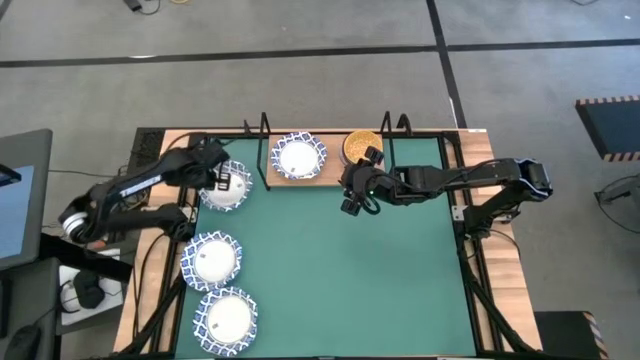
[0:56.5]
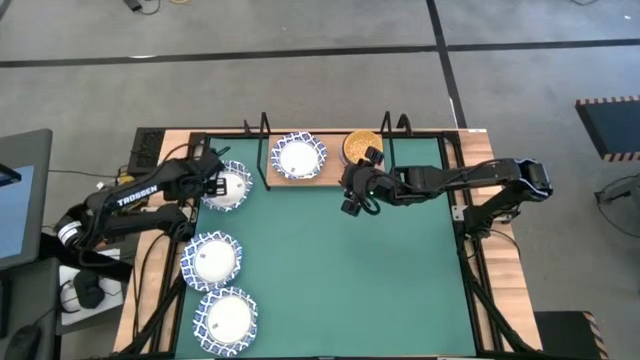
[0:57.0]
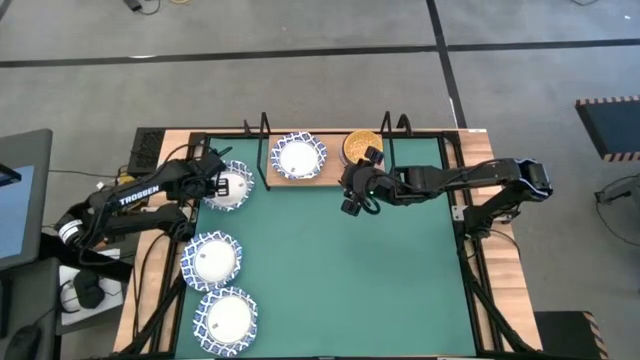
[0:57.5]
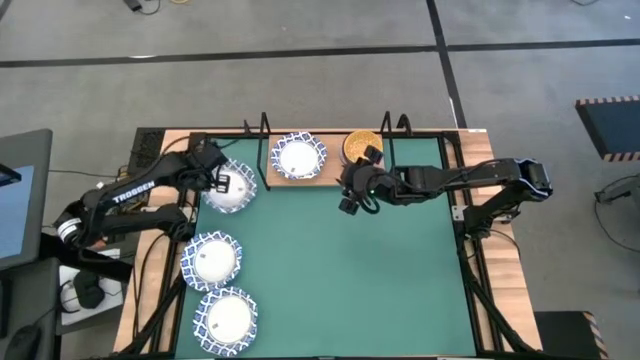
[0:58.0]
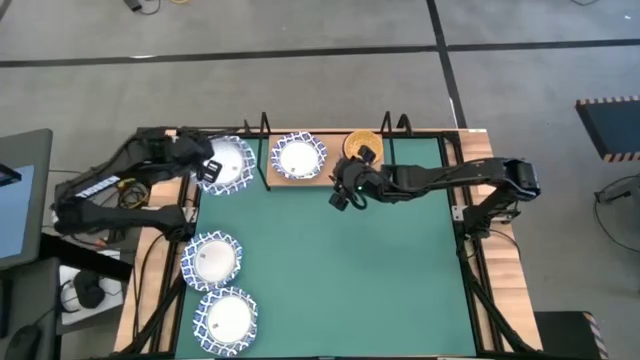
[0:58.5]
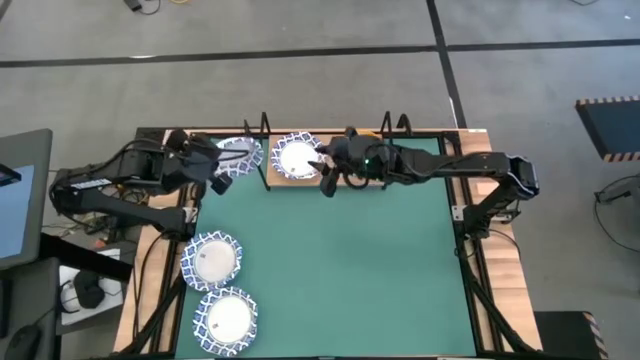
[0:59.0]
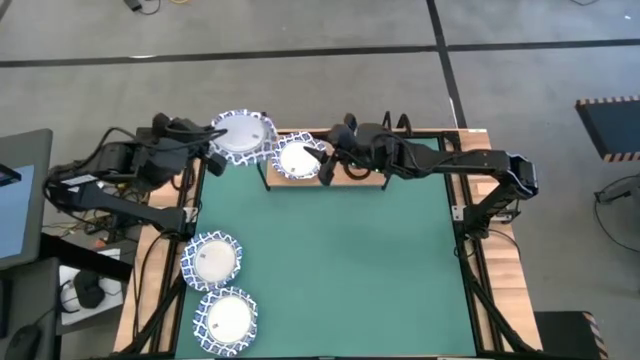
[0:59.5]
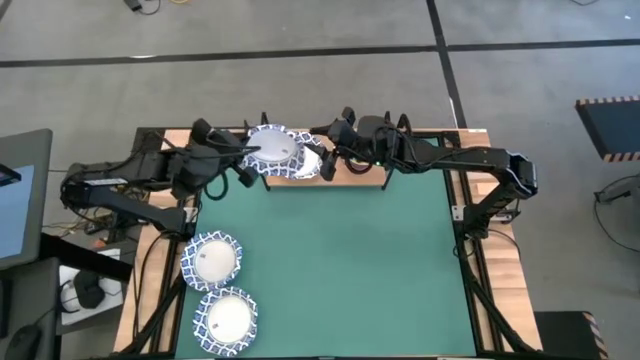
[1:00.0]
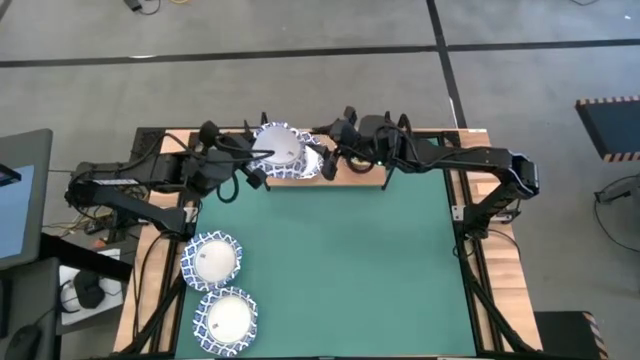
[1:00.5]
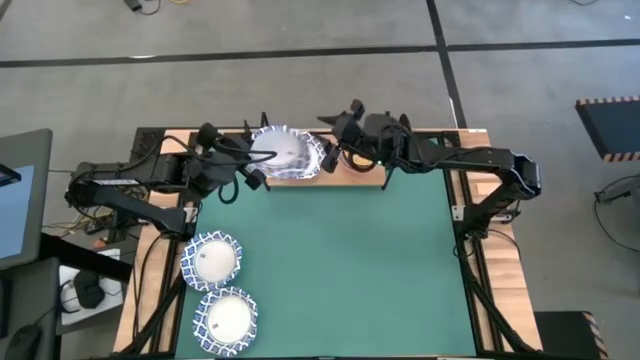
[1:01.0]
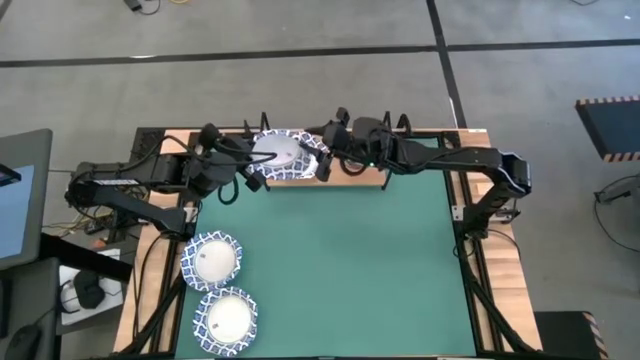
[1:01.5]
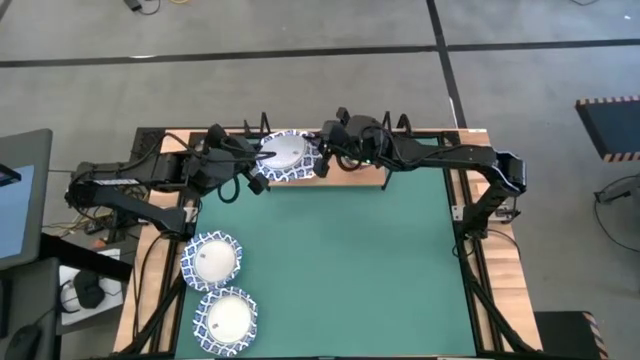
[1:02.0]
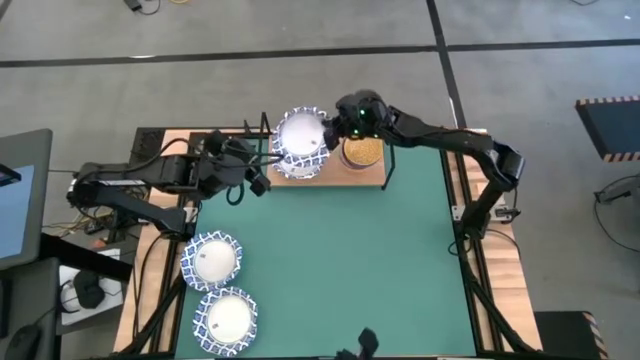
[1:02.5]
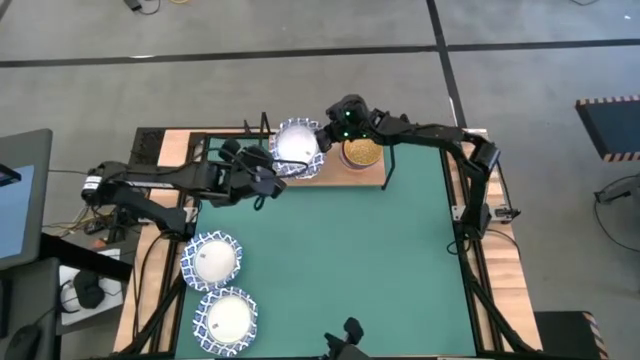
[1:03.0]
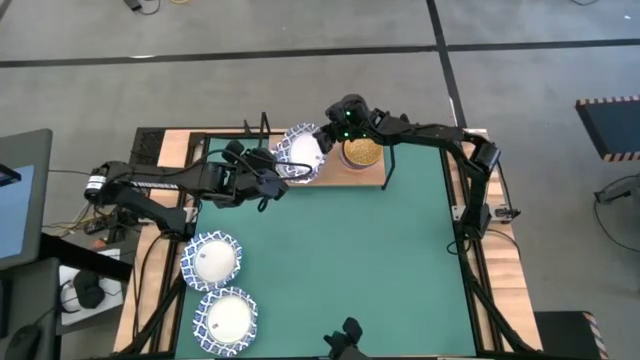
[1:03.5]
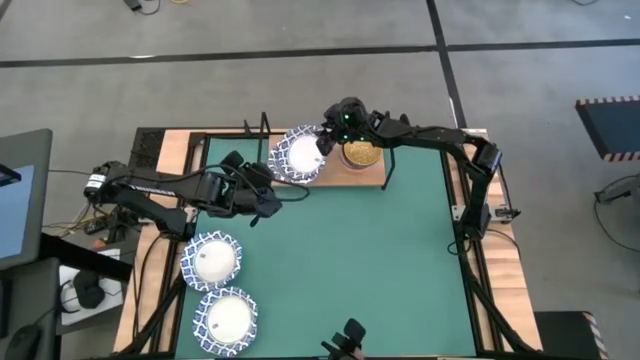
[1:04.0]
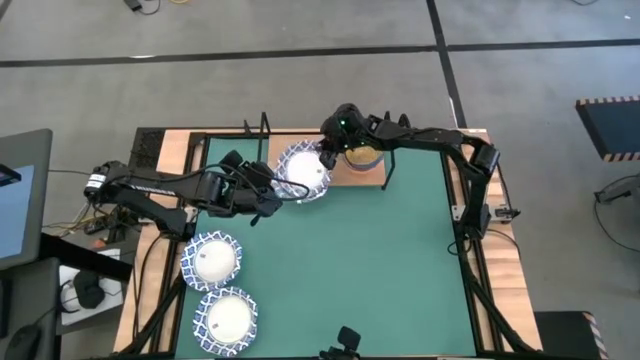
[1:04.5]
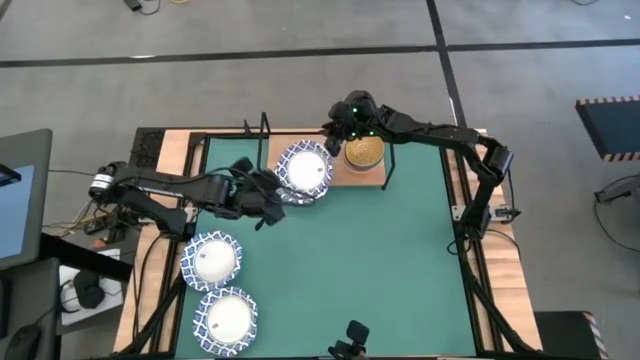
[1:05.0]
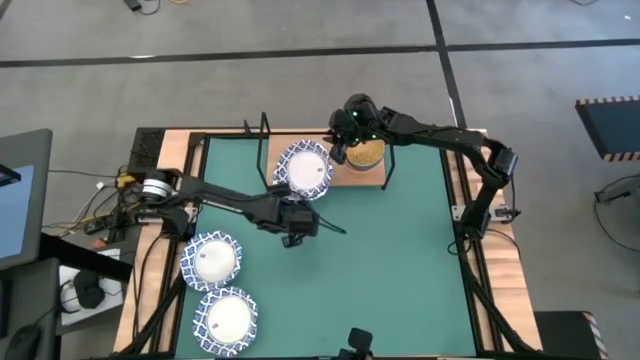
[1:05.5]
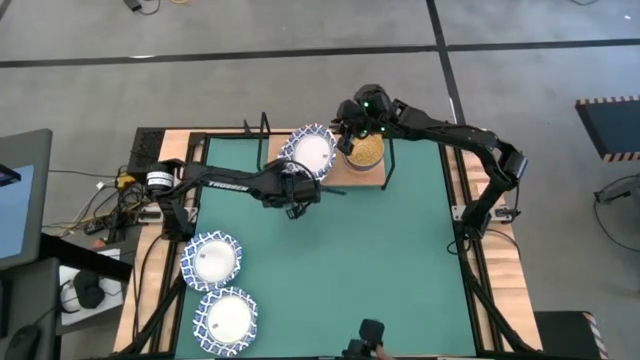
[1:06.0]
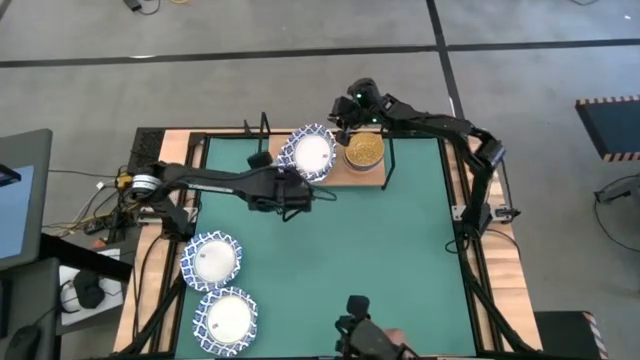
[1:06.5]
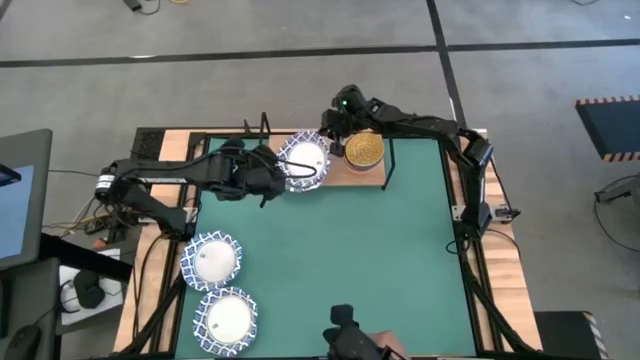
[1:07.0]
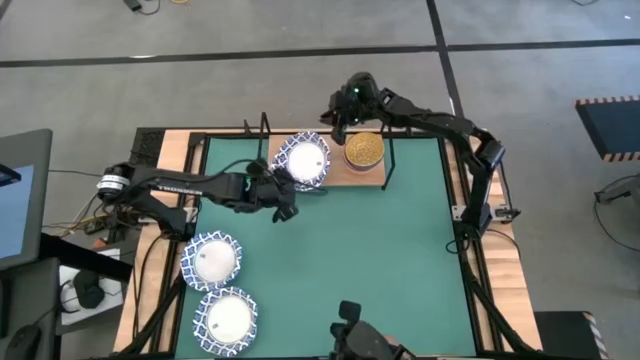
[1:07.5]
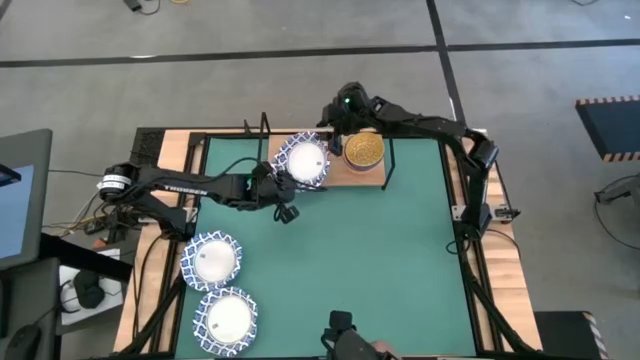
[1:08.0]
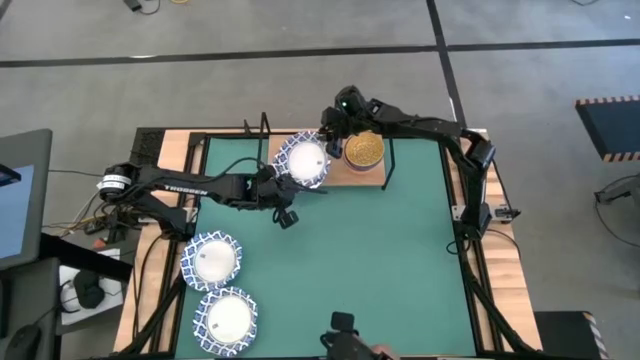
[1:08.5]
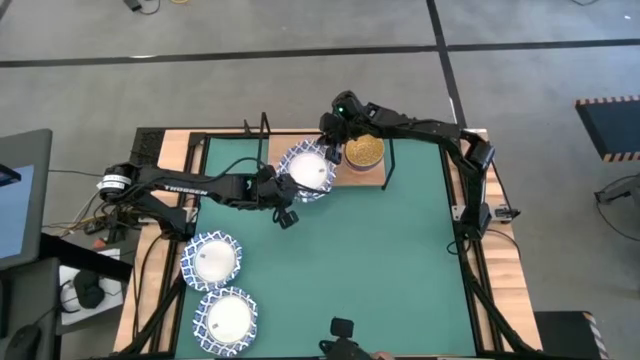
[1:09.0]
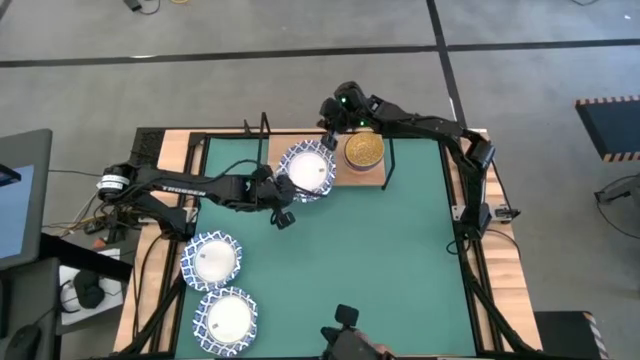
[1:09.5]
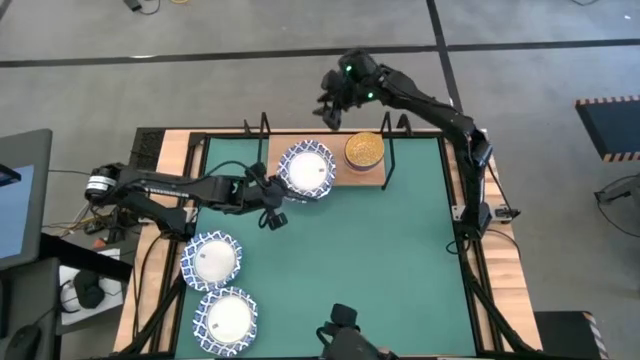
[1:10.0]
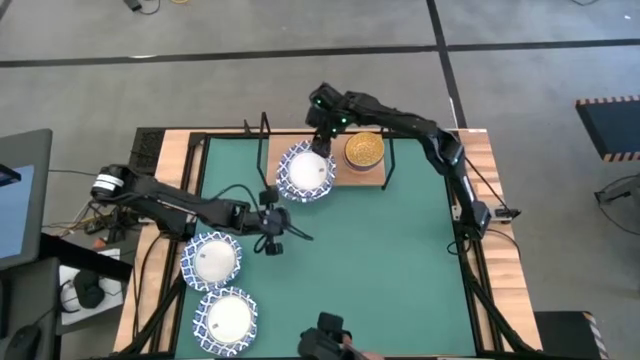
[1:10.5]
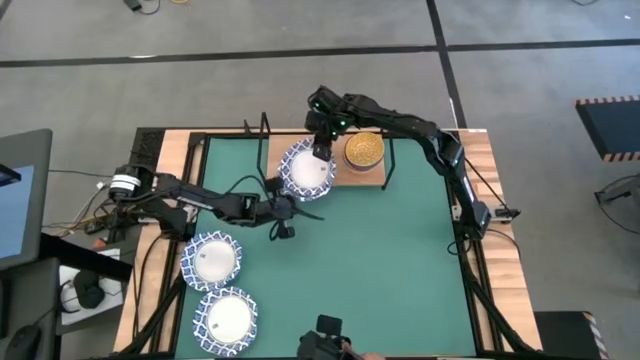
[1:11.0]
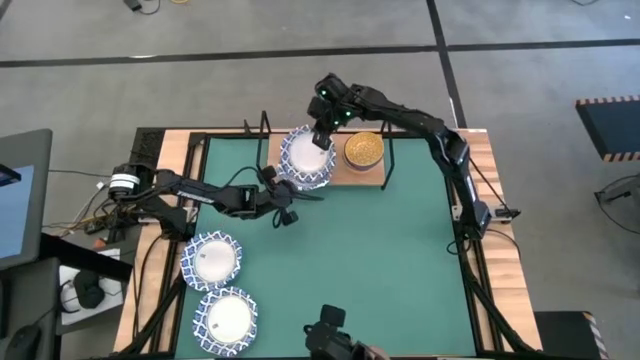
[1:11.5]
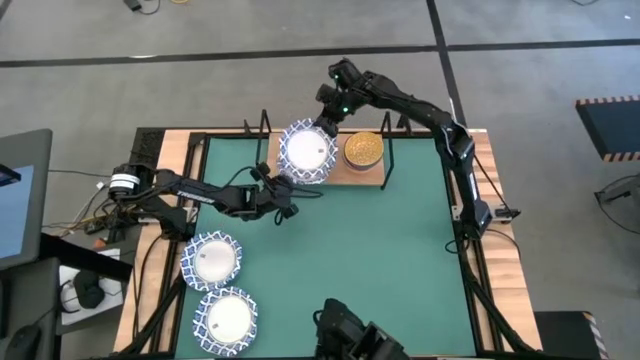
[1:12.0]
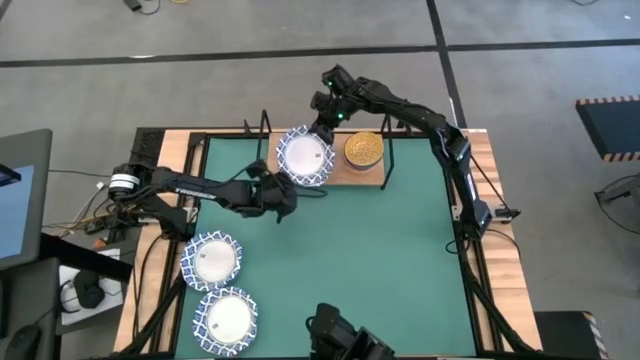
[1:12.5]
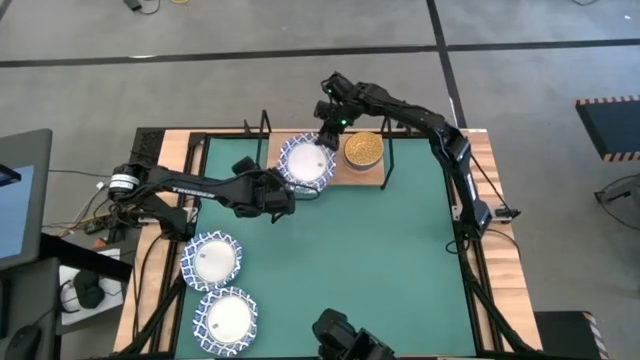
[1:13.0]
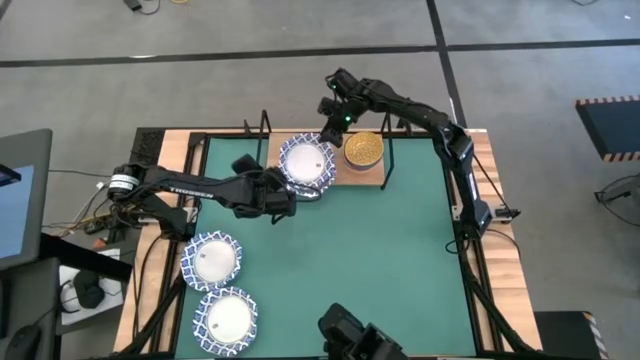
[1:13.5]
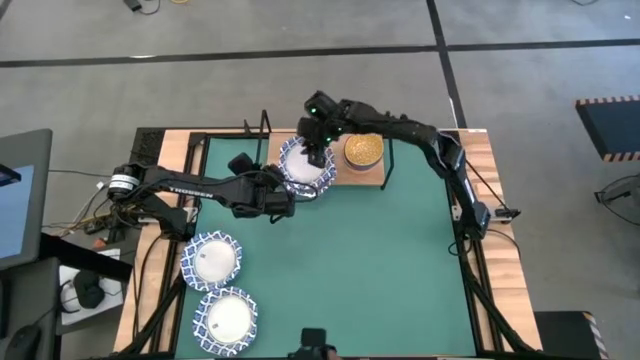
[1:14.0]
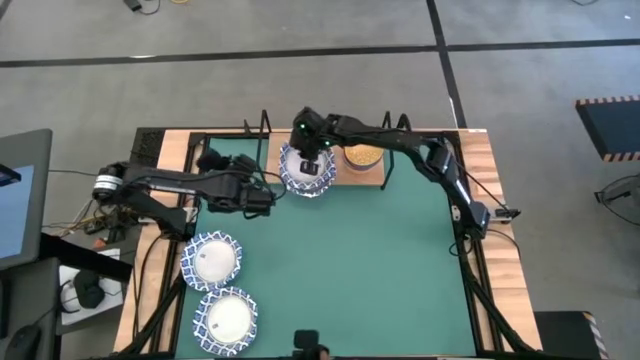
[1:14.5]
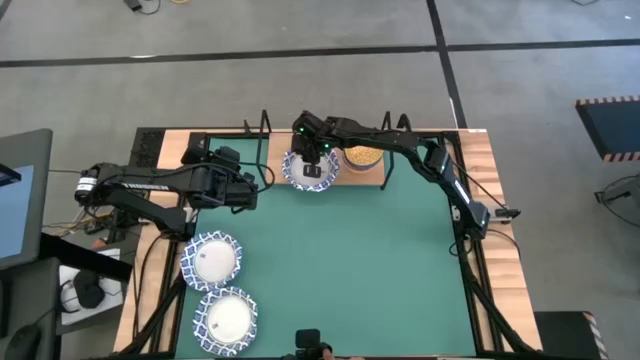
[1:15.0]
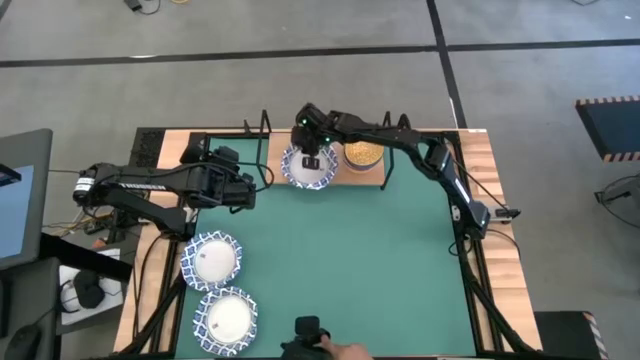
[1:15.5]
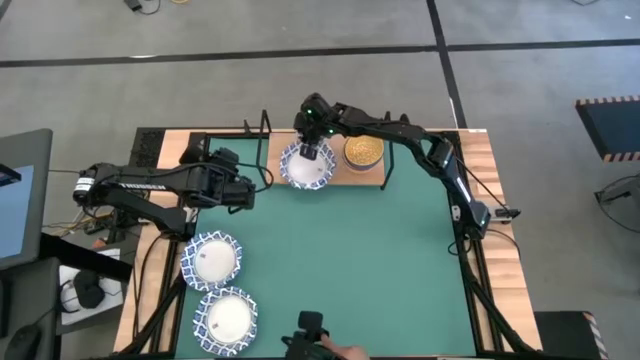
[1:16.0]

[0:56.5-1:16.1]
Task: Place and stack bowls onto a shelf
Stack the white patterned bowl on top of the white patterned bowl on the shelf

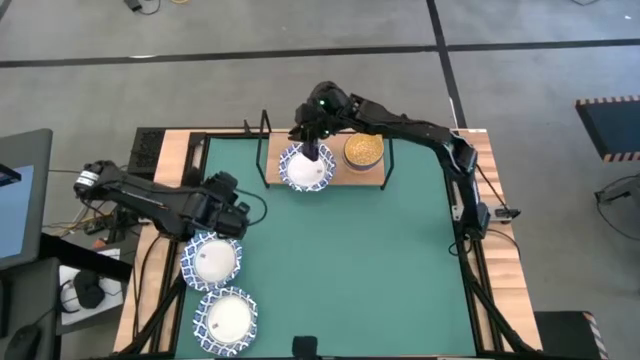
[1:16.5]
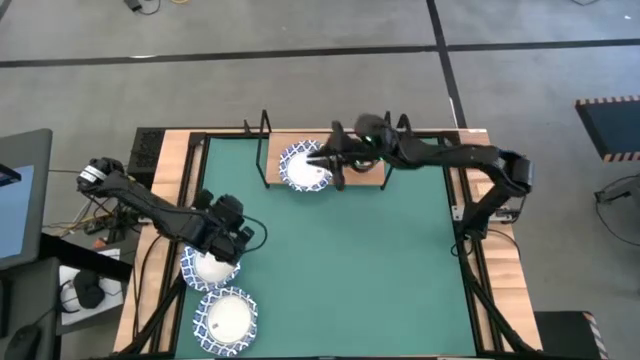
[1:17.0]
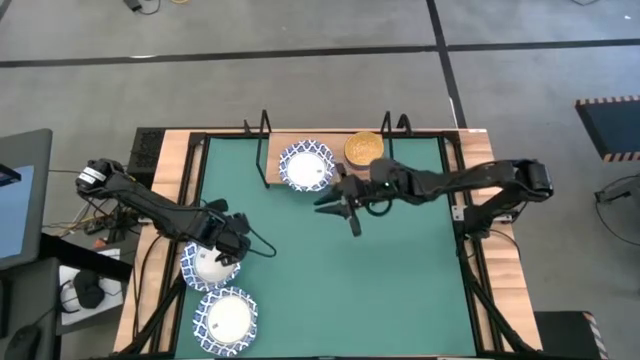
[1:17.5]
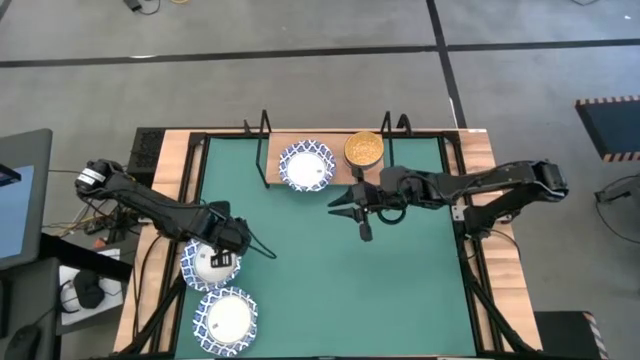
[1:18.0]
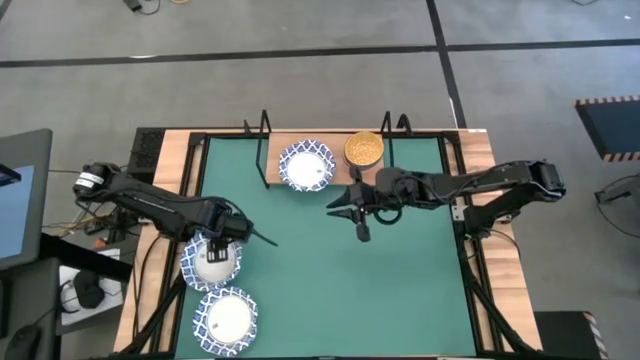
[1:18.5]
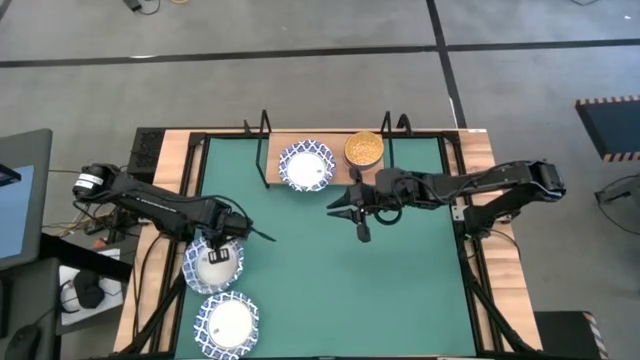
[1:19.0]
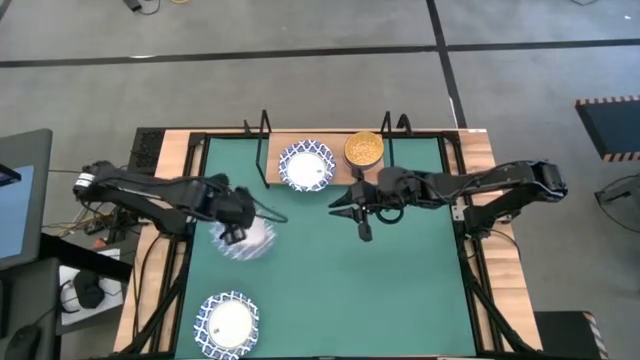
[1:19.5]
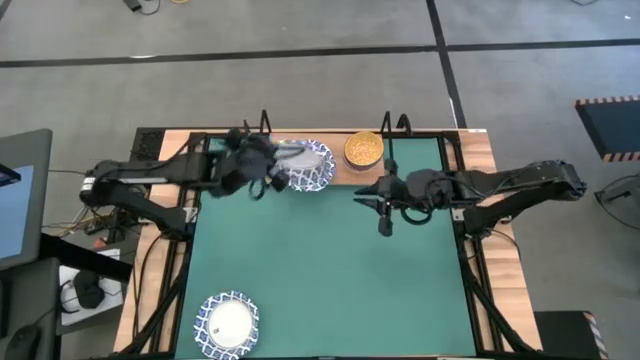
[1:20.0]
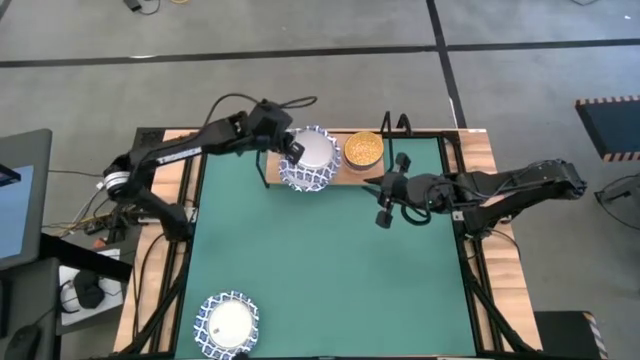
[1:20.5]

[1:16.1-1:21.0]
Stack the white patterned bowl on top of the white patterned bowl on the shelf
